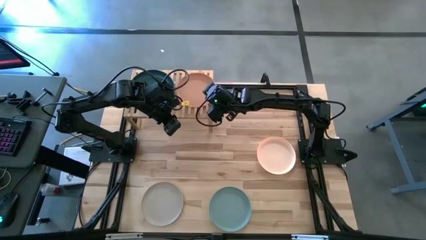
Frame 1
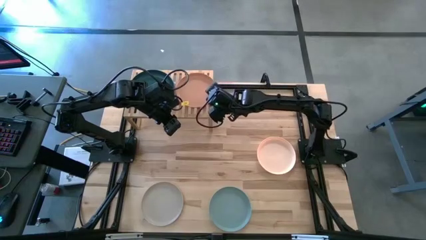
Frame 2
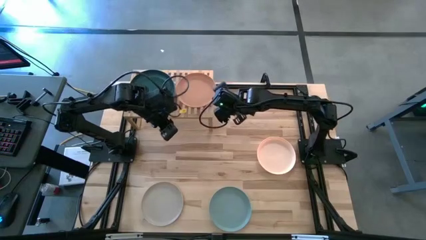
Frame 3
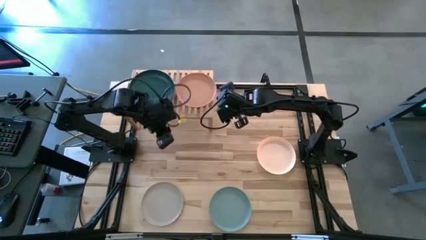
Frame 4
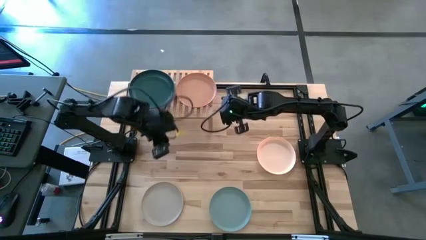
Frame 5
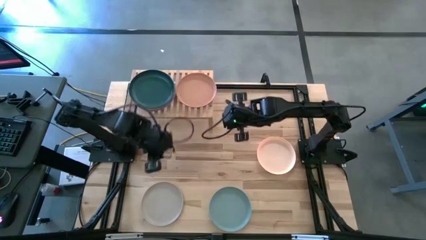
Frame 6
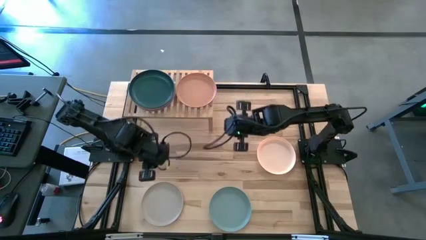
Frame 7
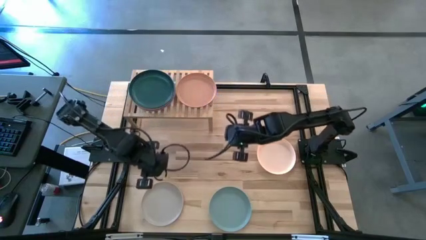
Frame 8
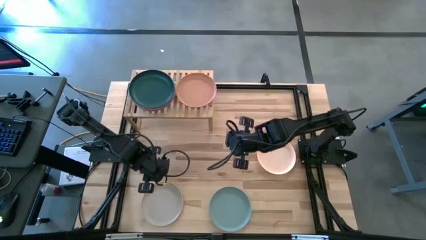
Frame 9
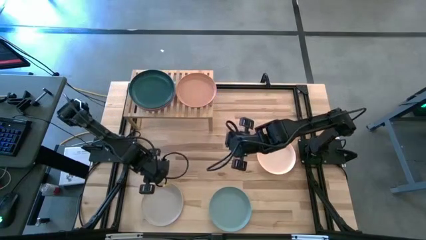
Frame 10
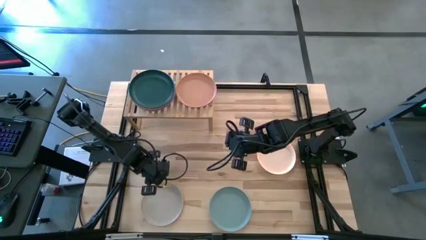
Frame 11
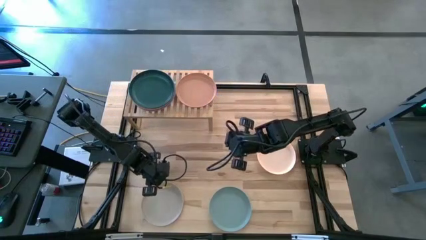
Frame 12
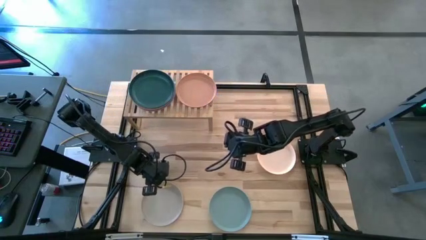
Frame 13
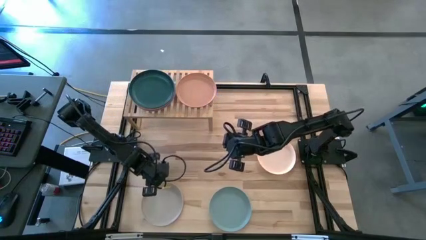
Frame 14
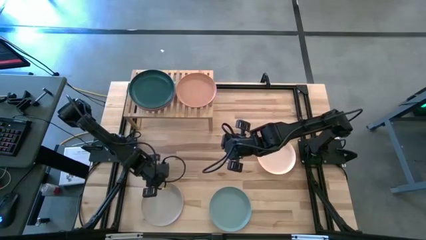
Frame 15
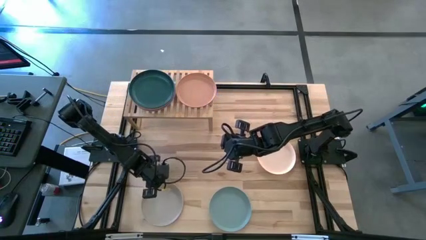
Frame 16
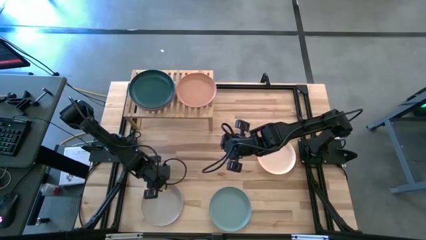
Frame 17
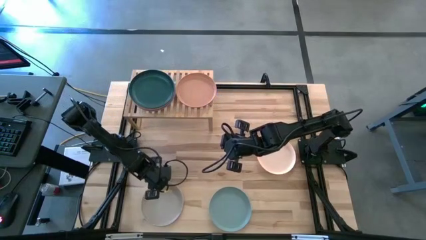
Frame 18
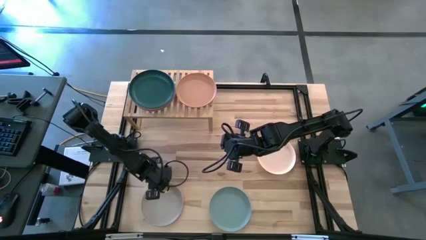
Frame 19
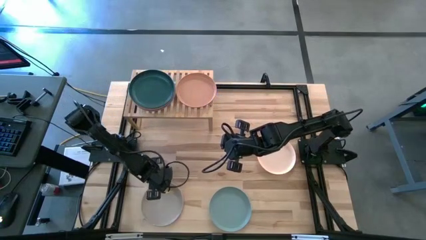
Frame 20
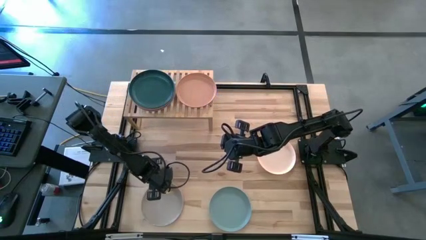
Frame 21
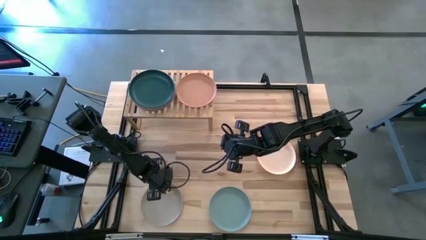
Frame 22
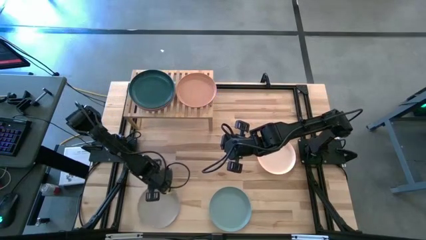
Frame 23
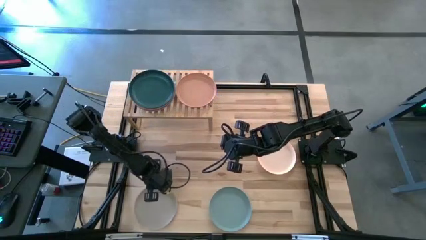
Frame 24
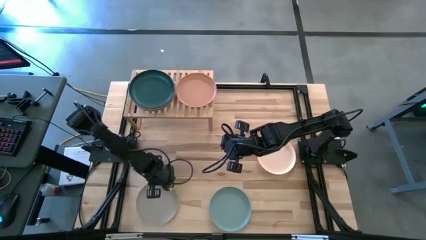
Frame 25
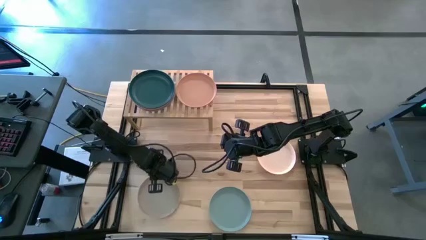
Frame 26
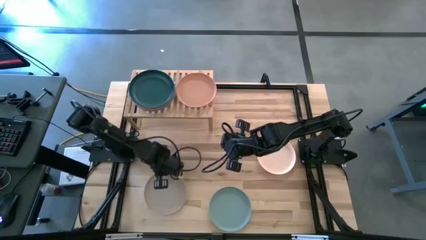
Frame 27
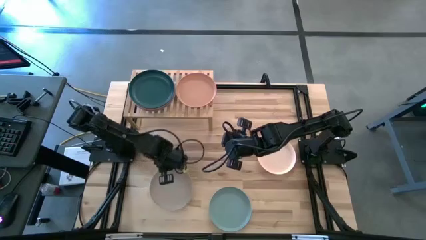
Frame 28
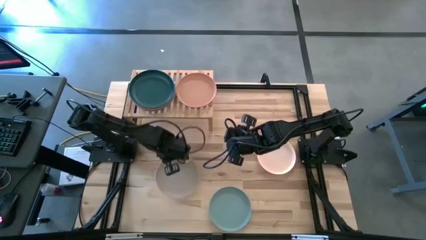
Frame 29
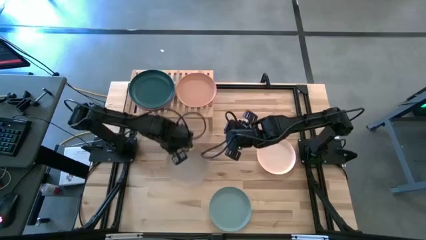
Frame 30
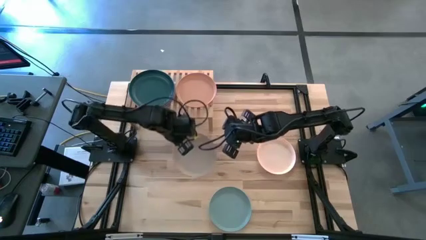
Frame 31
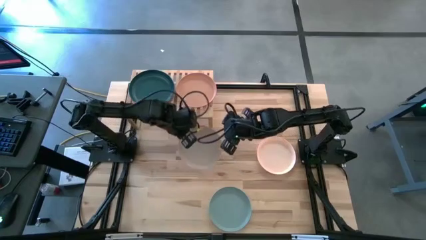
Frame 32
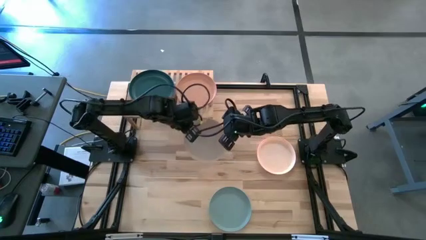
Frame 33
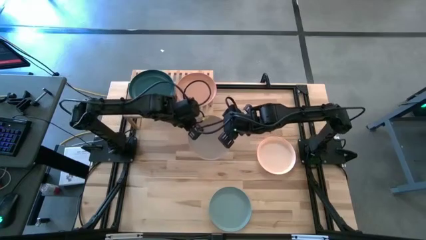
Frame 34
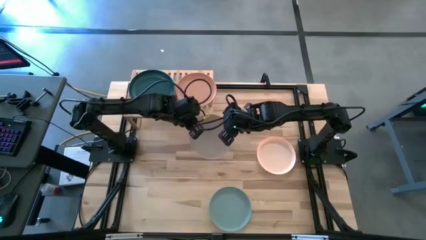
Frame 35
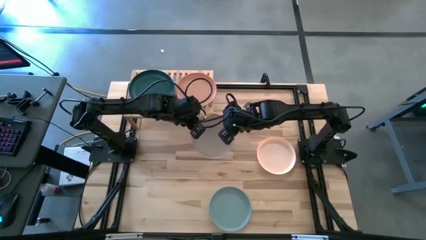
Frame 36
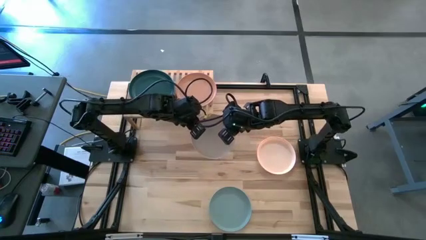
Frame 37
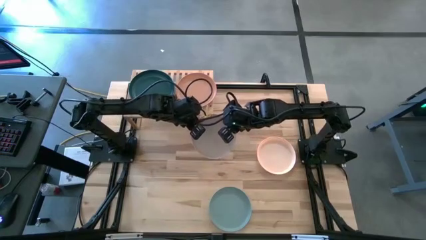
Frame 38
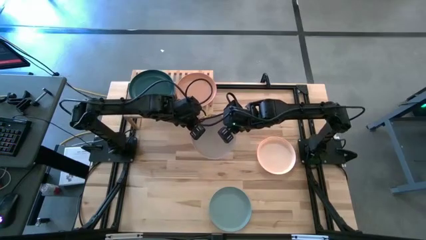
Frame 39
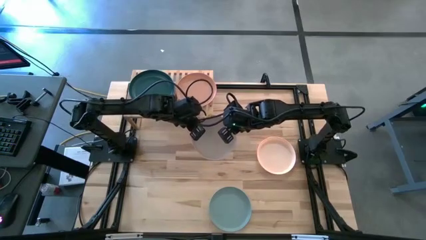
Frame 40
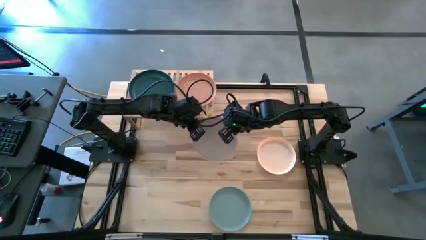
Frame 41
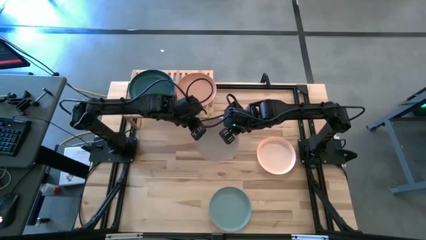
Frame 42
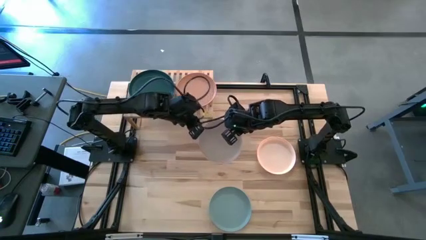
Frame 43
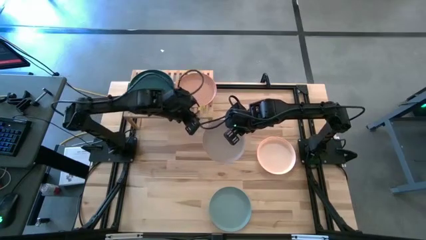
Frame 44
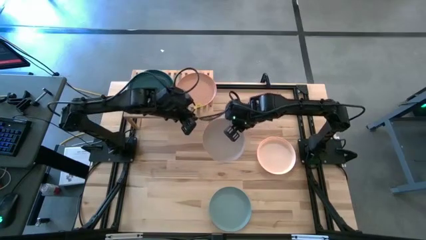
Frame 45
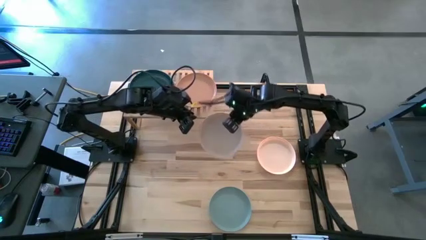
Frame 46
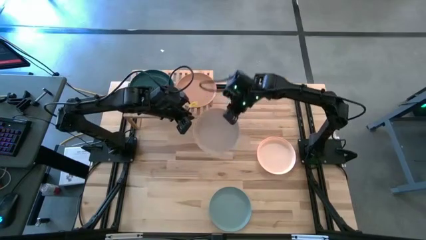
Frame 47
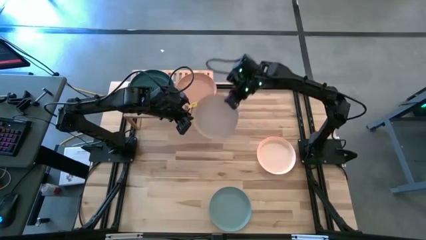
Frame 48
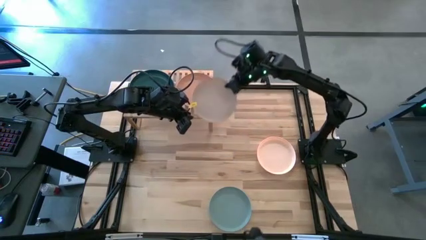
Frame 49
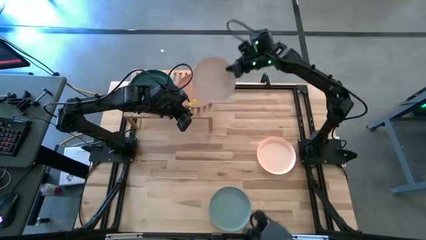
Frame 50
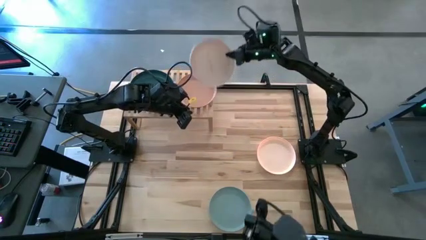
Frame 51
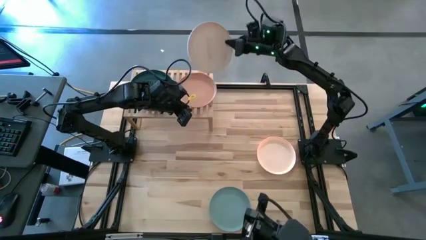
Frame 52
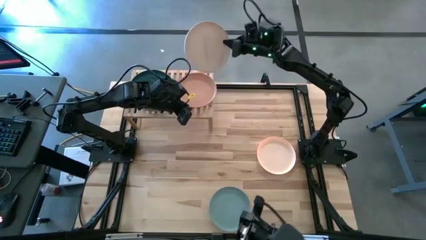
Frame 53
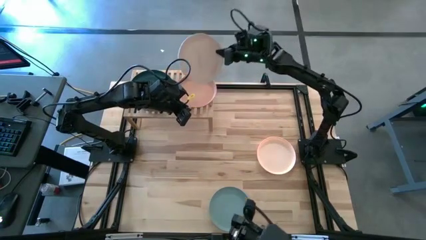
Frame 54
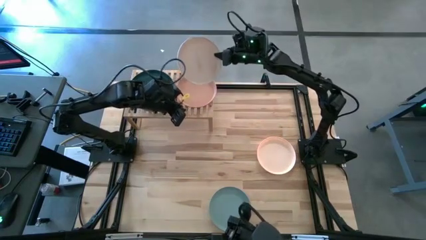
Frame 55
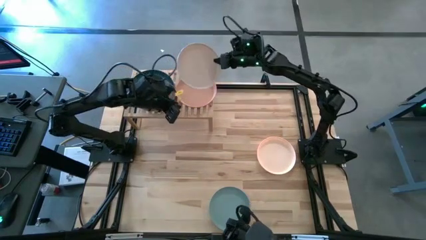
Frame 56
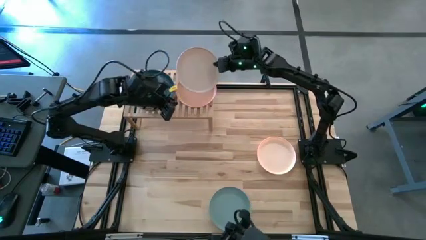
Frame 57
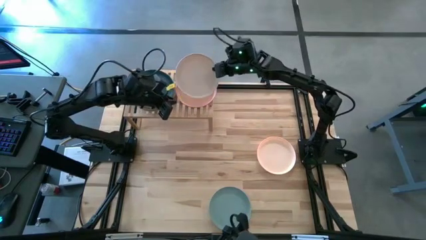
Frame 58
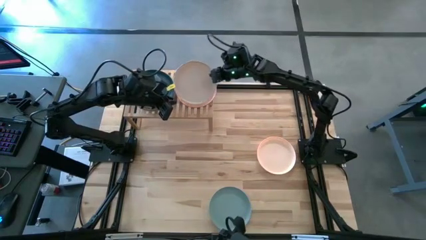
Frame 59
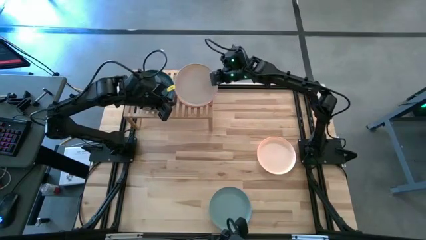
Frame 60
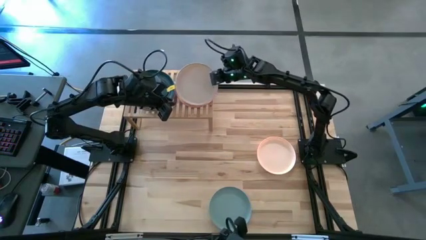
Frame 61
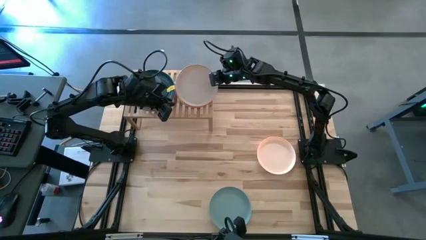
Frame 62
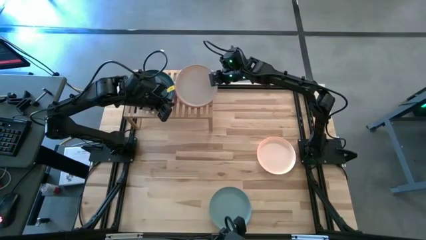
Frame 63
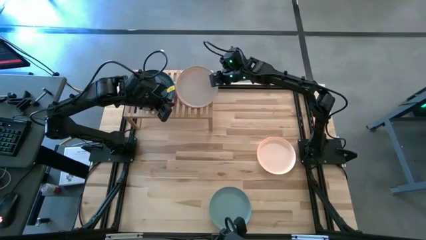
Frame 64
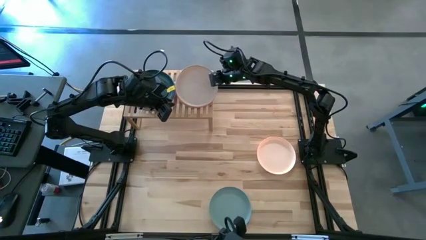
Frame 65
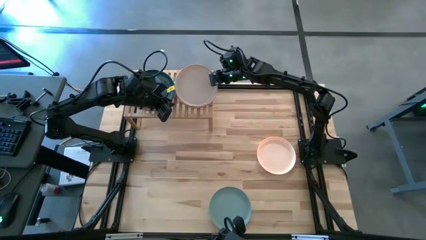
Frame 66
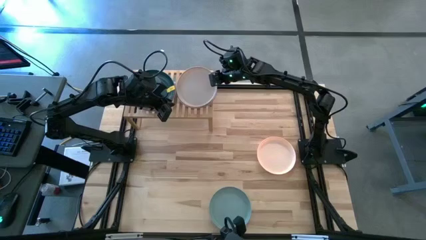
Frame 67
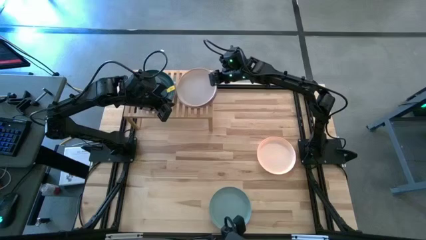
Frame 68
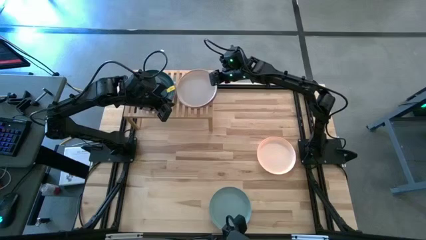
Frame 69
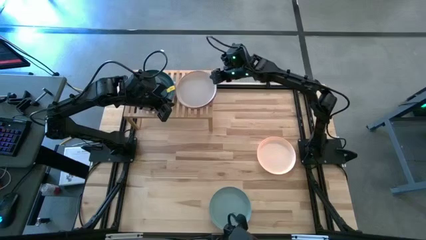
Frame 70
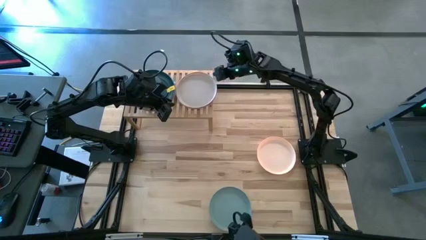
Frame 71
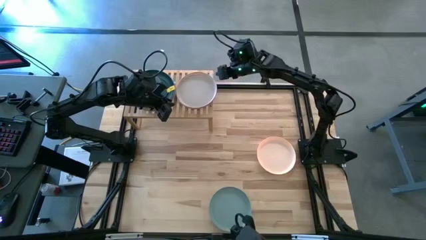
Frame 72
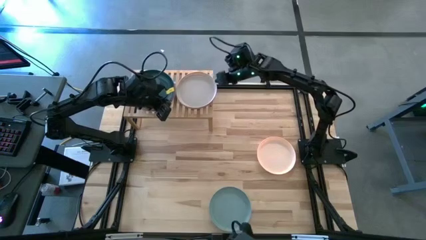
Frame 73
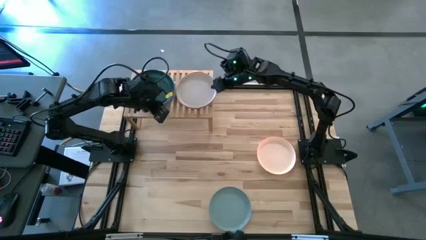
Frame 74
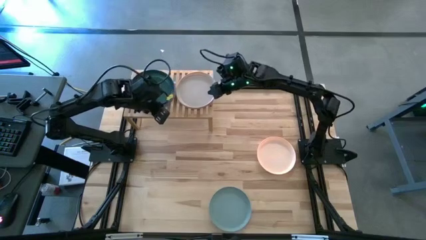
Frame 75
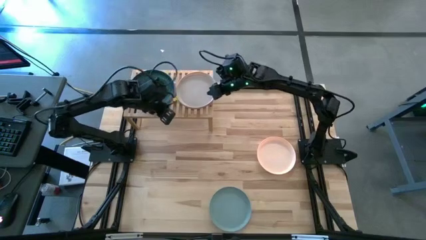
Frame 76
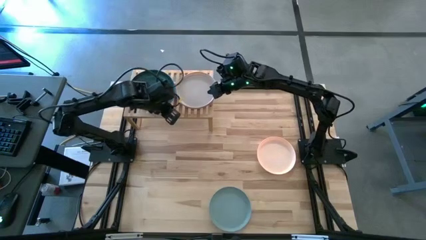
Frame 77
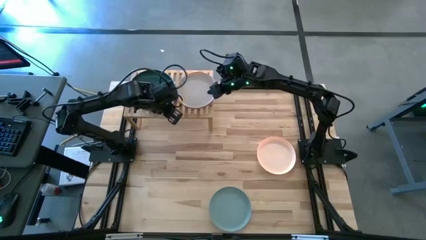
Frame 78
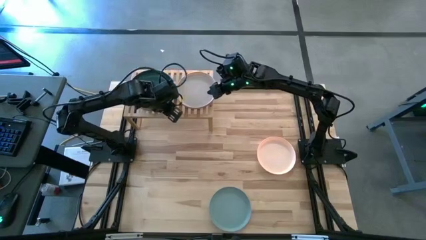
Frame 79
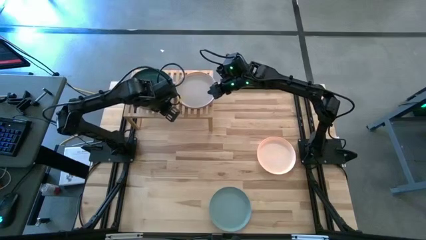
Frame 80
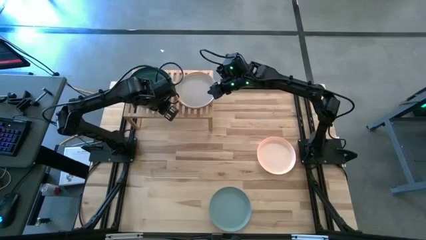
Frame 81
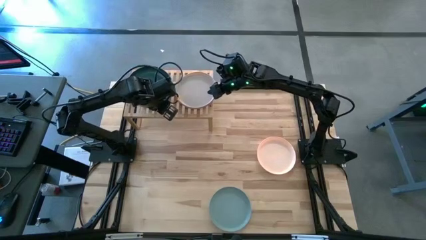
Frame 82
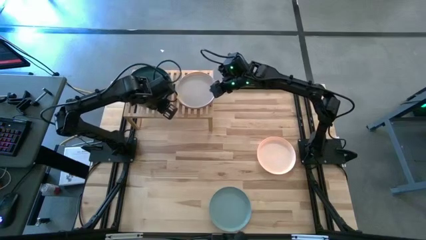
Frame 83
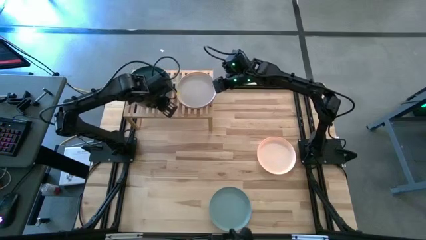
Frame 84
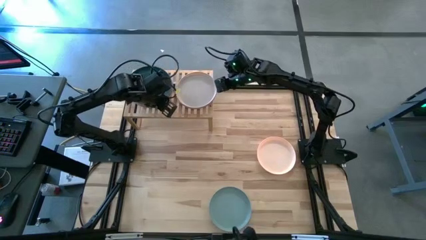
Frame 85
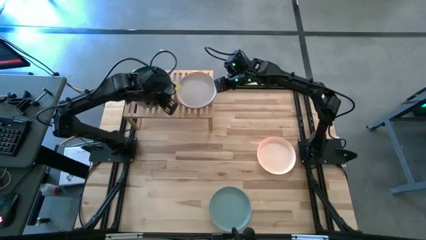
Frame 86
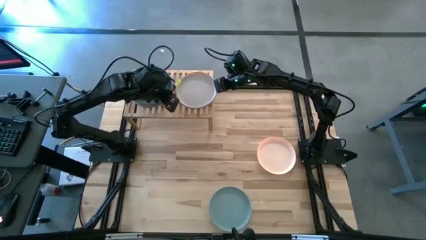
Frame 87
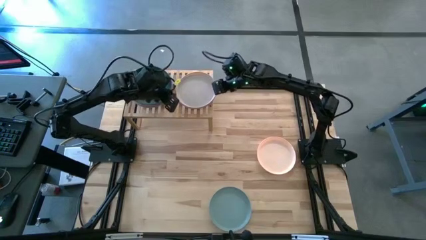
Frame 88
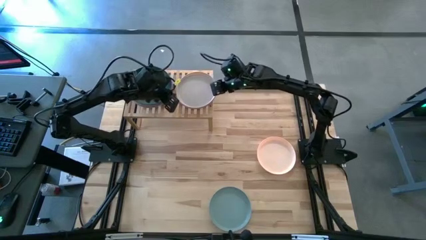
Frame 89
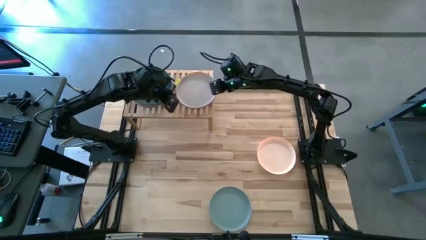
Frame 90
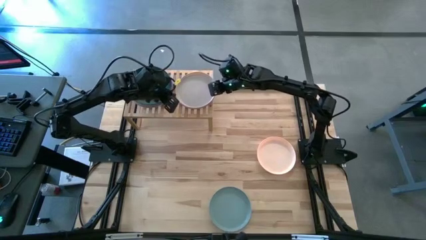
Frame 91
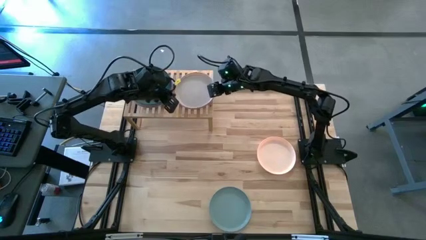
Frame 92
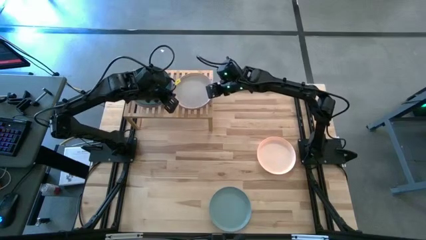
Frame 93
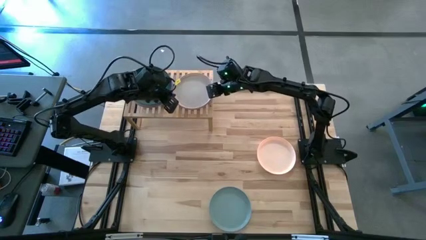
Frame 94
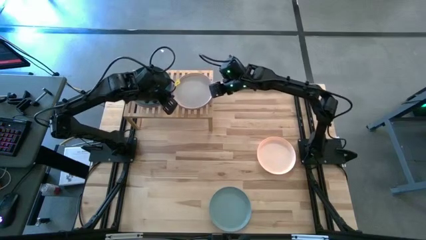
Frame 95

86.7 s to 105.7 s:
Task: Place and stack plates onto a shelf
Stack the gray plate on the top of the brown plate
